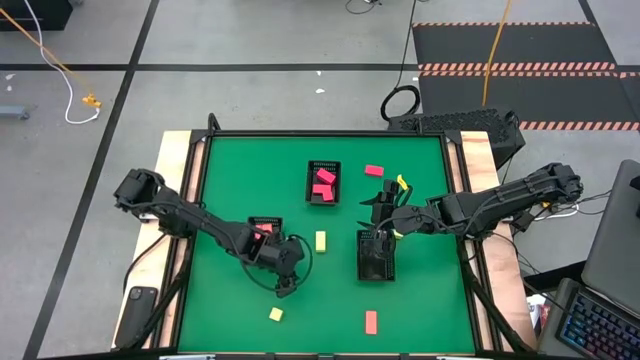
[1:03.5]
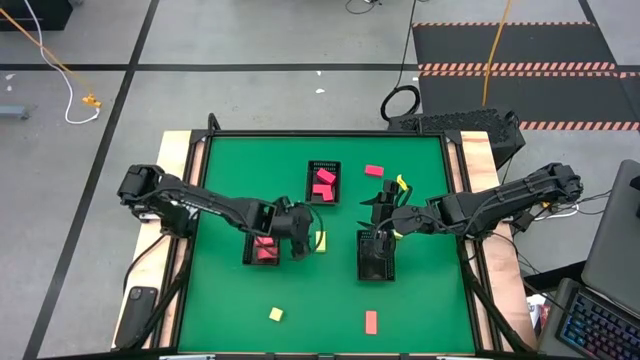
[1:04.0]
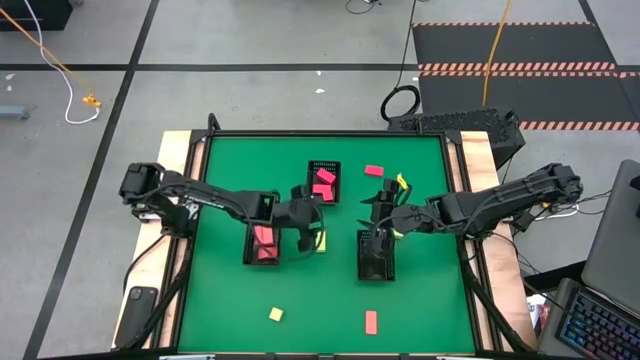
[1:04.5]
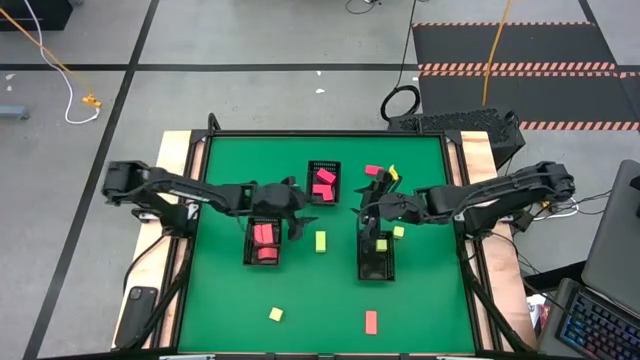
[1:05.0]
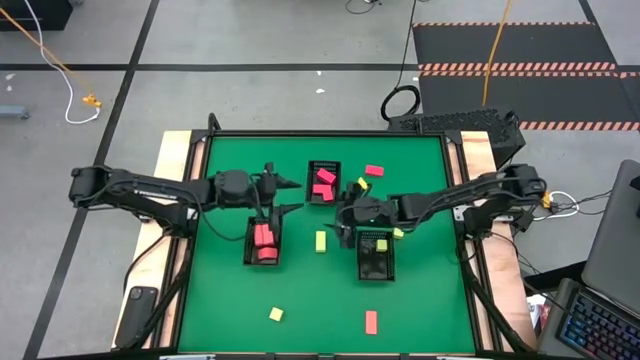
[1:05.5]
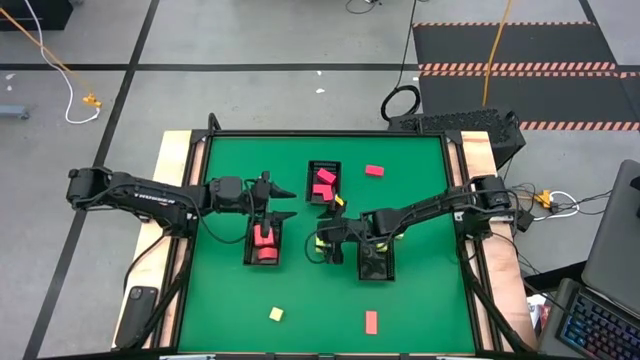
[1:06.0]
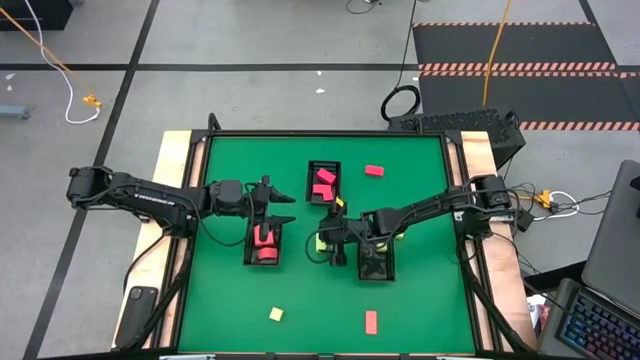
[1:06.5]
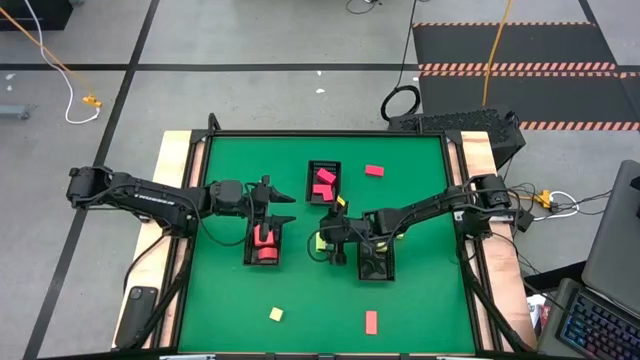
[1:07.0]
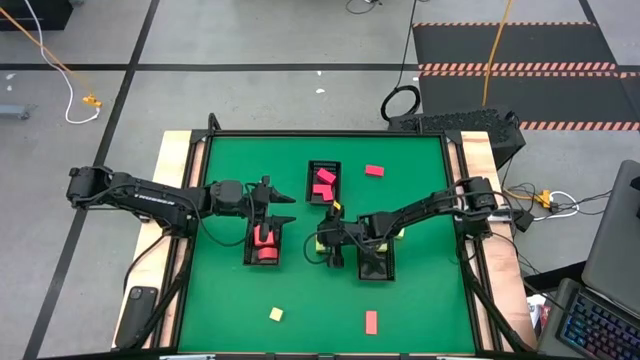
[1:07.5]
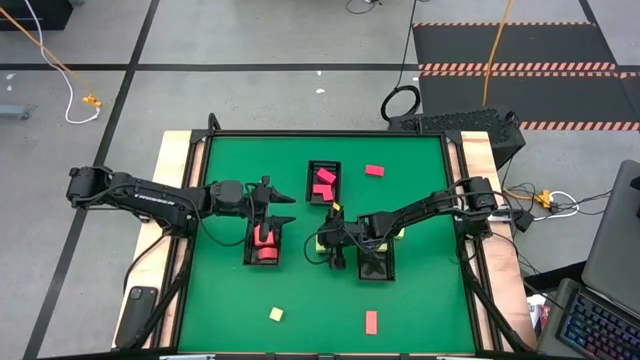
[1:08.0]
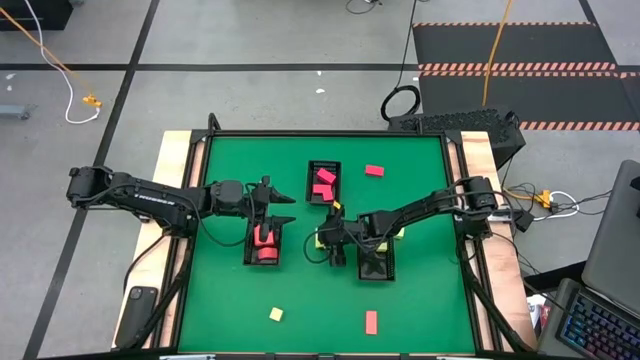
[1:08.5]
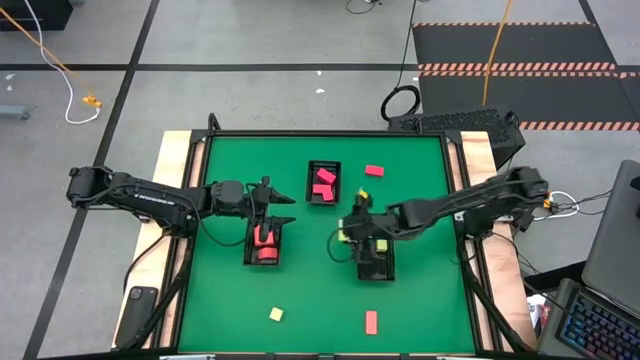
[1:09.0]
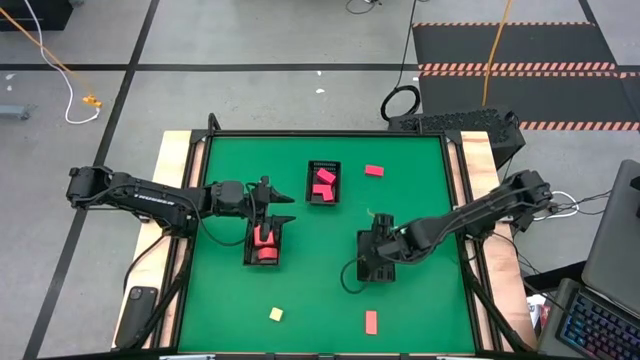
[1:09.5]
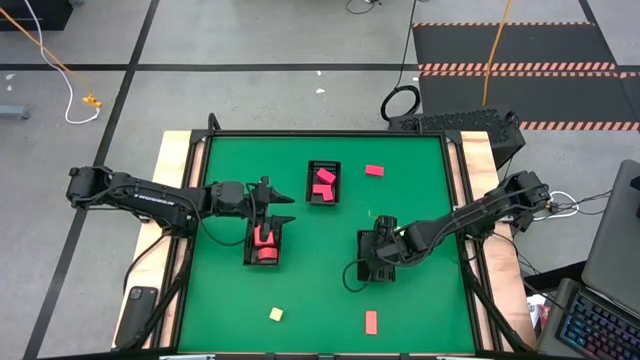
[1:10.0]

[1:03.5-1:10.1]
Task: Sort & place blocks by color
Put the green block into the bottom right black bin

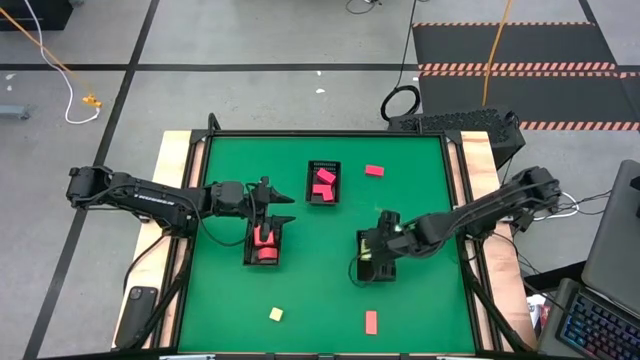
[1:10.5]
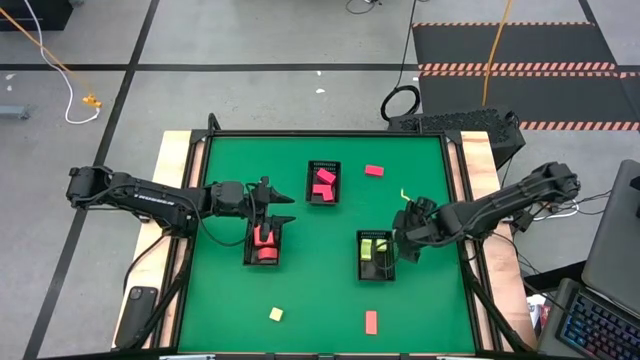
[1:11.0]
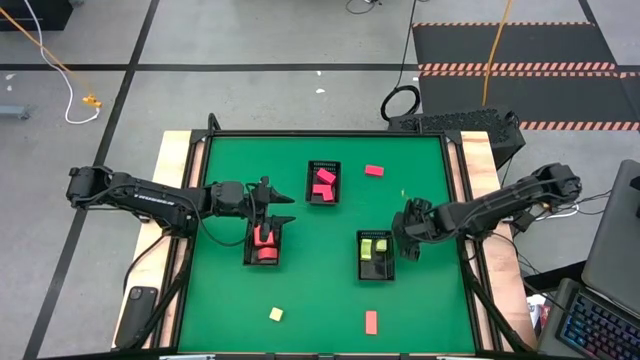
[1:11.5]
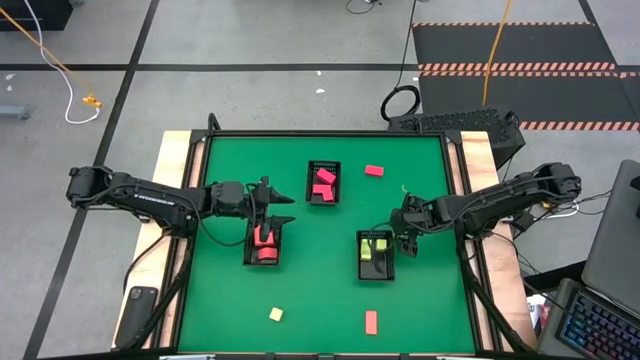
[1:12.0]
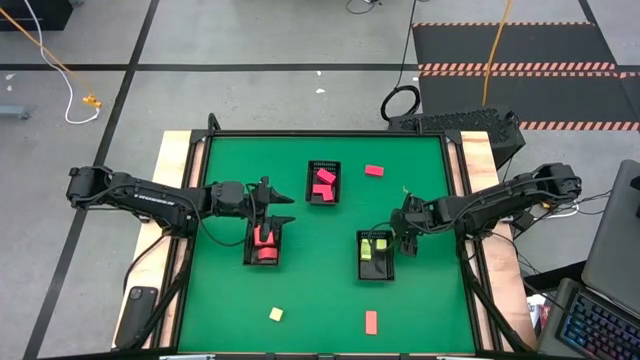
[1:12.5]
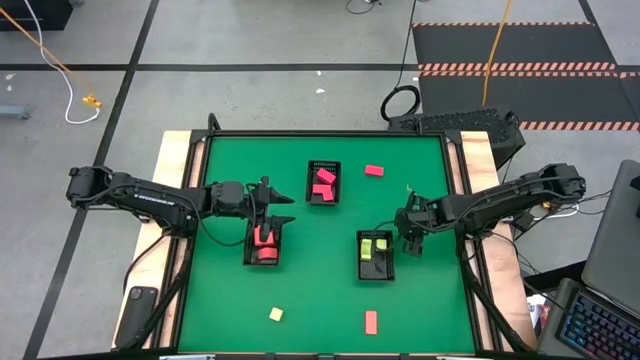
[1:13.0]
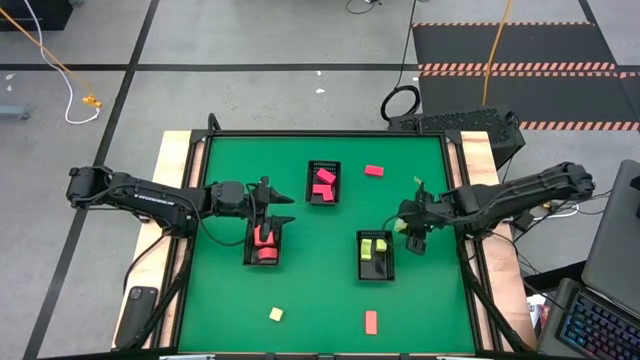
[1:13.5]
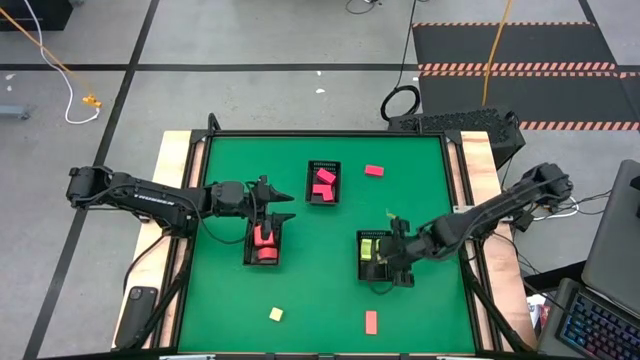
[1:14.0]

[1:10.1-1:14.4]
Put the green block into the bottom right black bin

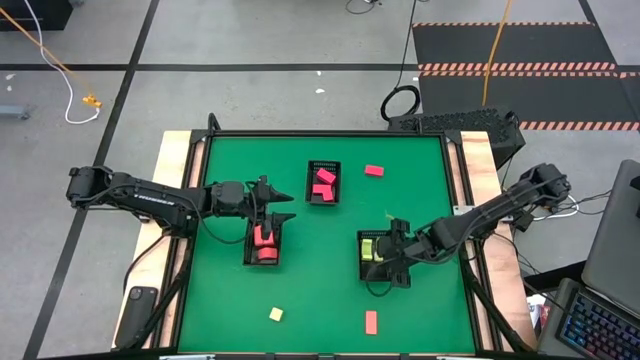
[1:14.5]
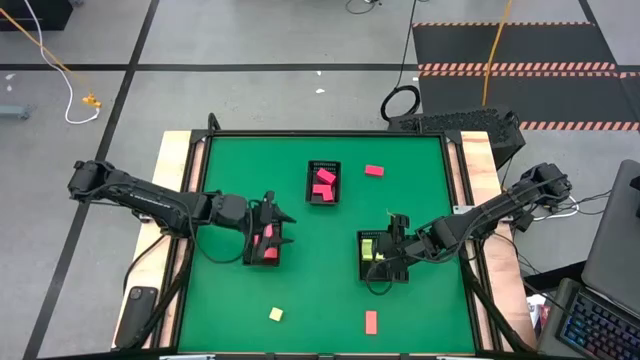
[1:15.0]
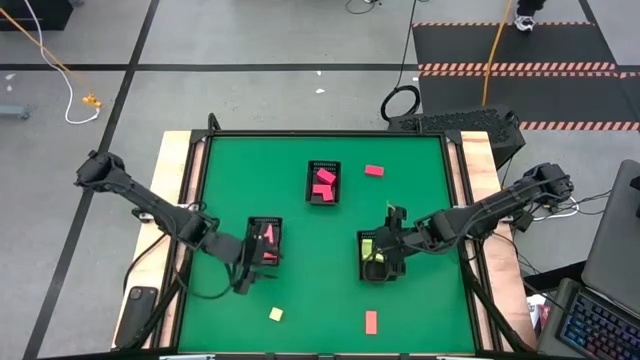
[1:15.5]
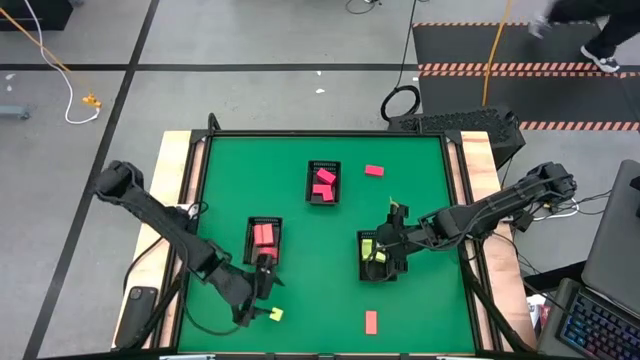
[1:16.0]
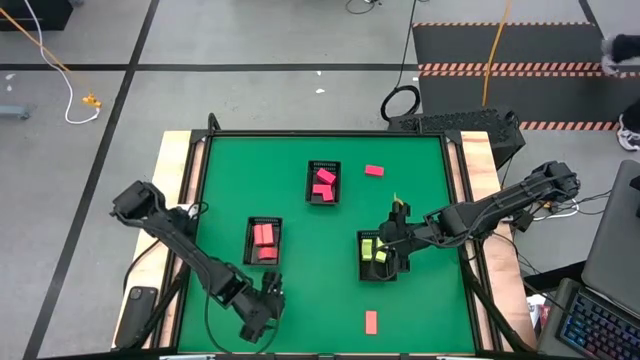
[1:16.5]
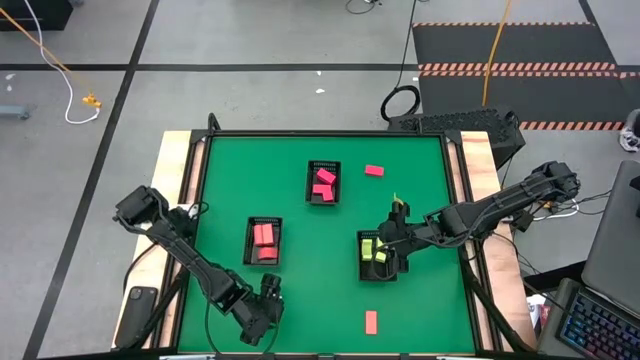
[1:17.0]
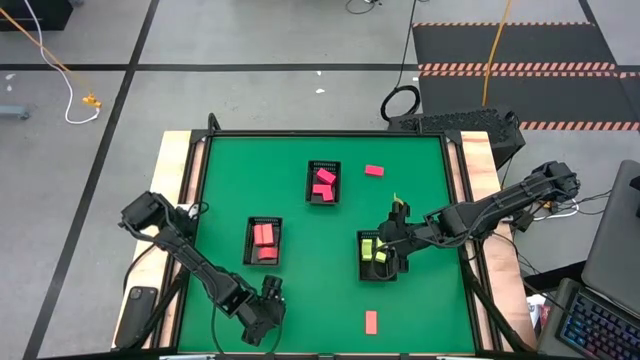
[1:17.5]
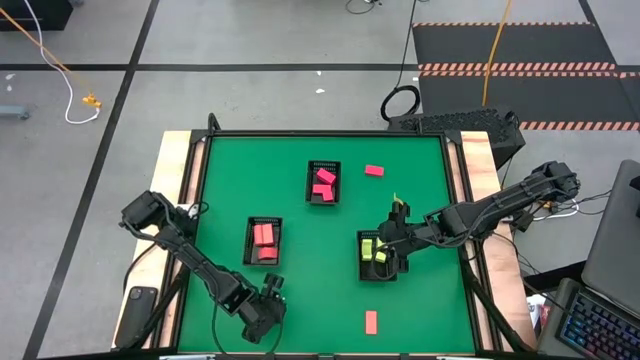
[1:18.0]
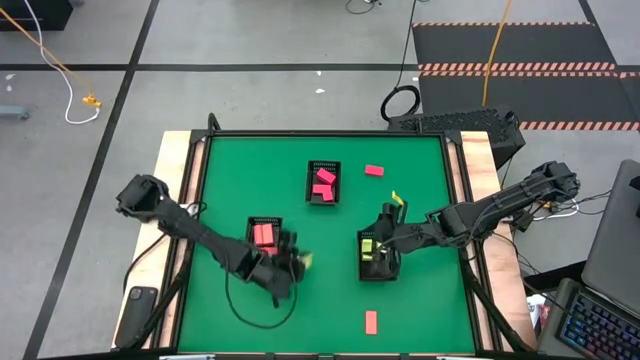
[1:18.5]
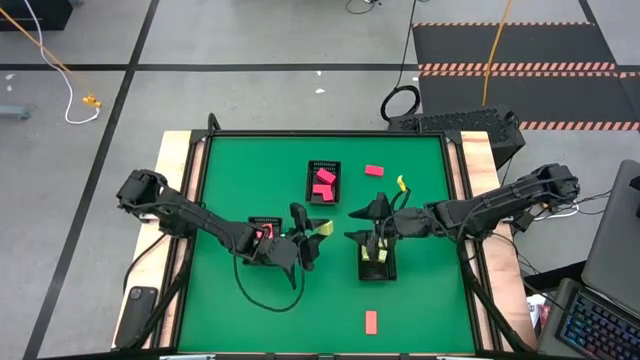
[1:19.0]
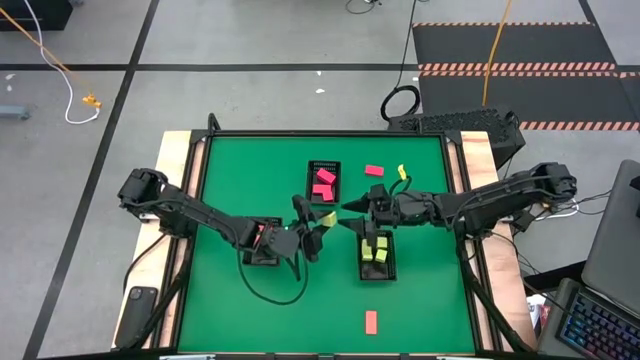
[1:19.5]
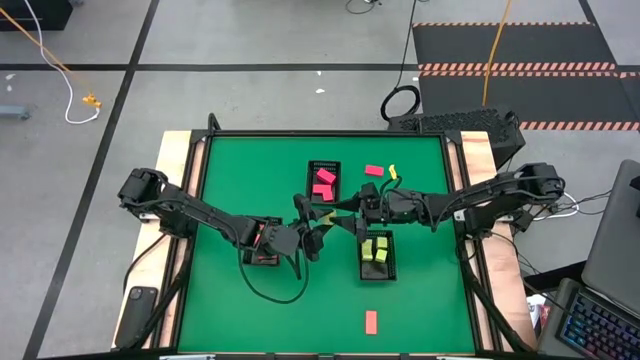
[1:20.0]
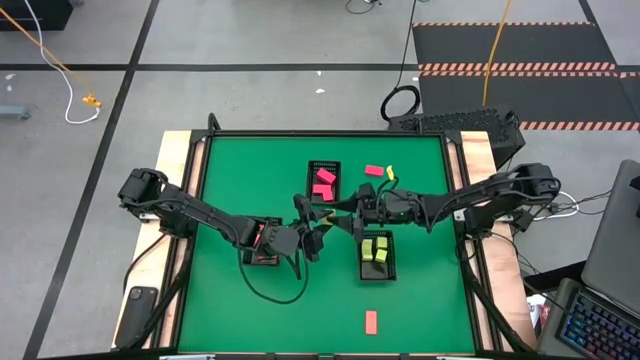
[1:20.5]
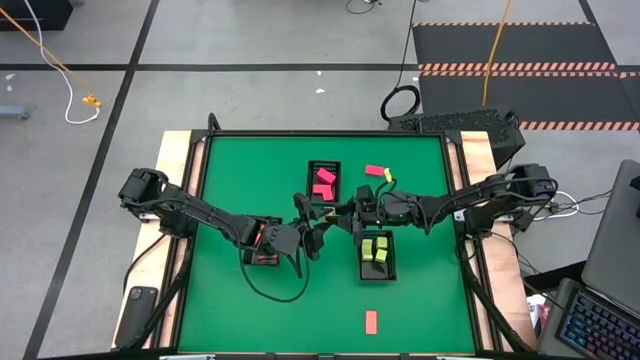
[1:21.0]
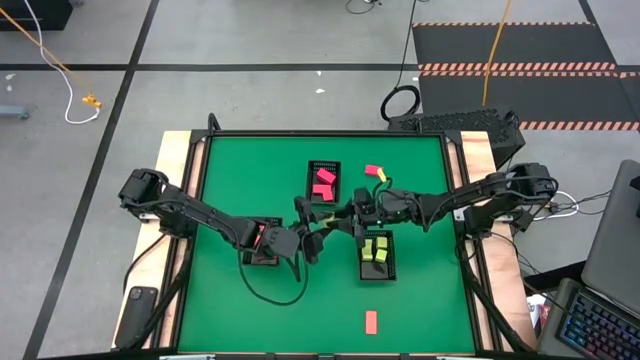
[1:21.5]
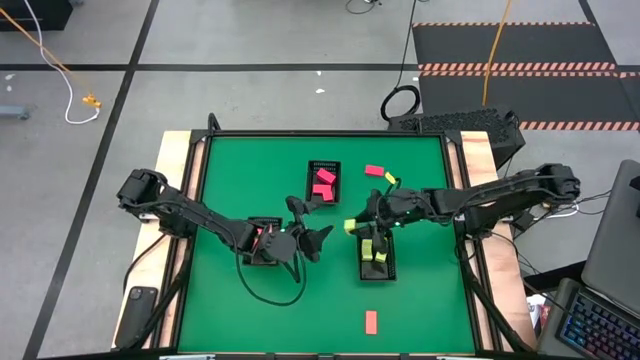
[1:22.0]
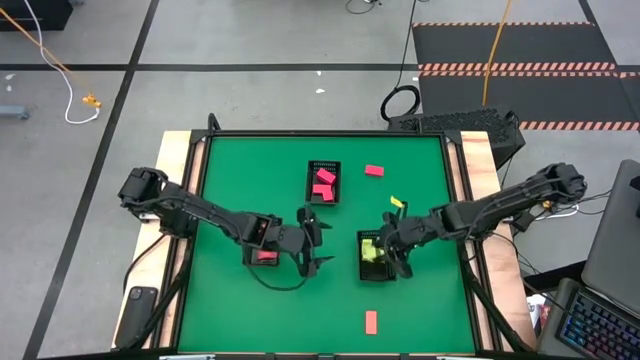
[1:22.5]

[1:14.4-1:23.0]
Put the green block into the bottom right black bin

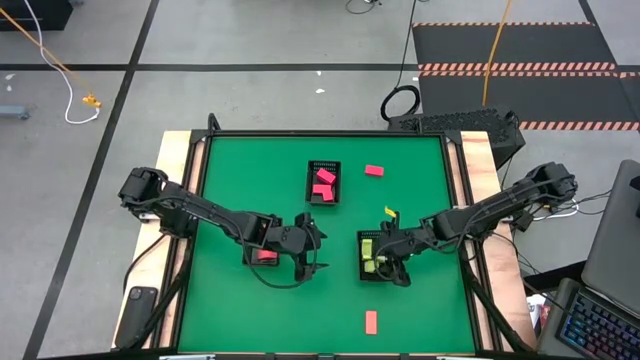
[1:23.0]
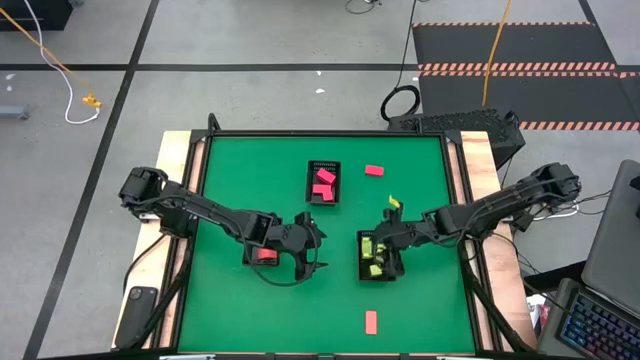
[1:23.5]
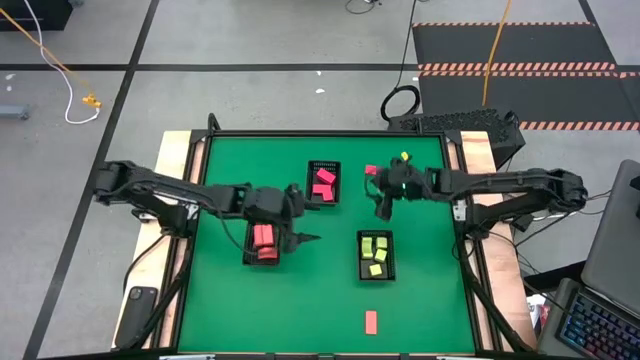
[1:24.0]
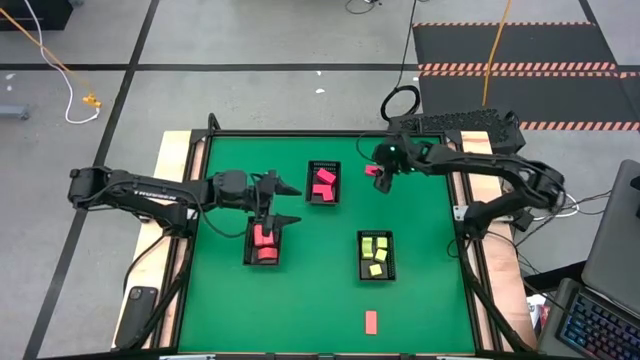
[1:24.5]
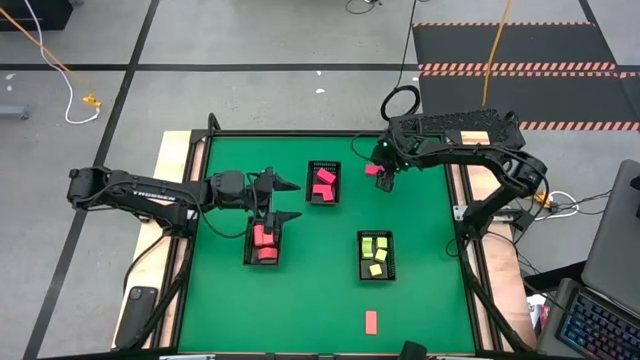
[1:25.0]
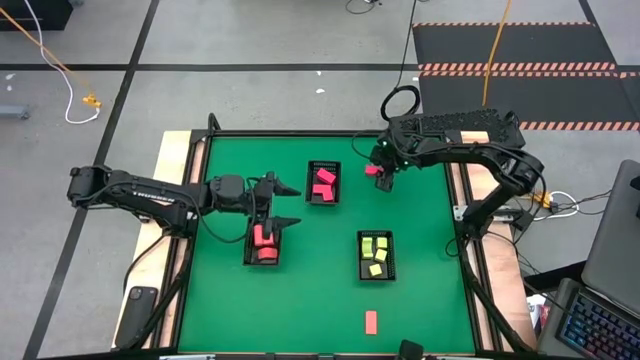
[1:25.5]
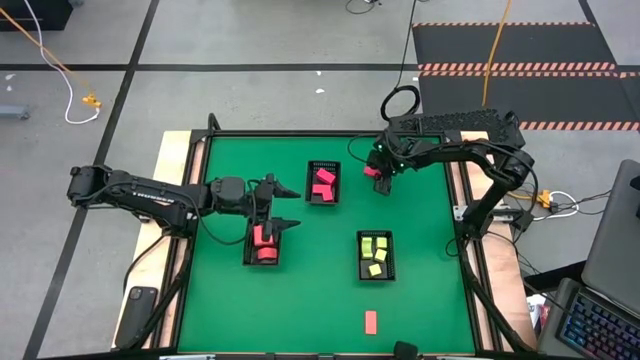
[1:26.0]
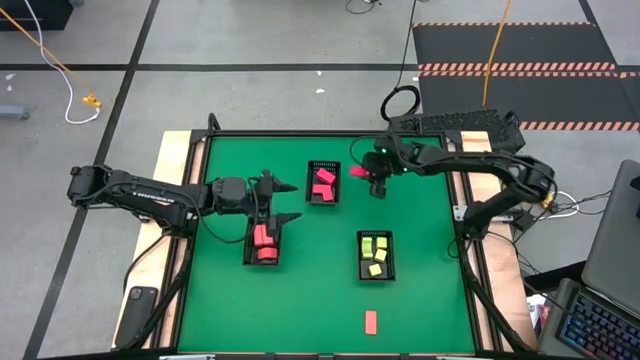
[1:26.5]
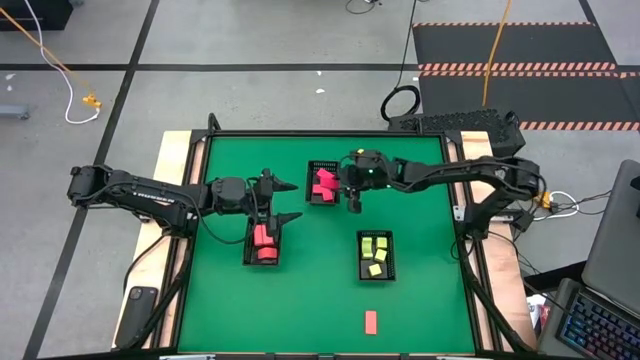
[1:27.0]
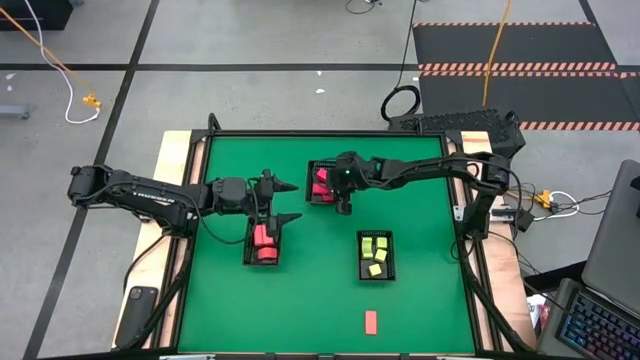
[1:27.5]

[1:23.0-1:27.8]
Put the red block into the top black bin
